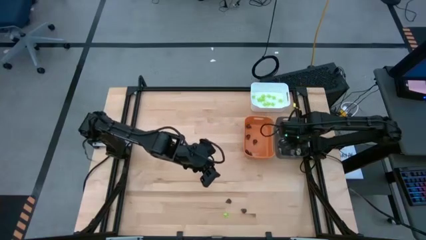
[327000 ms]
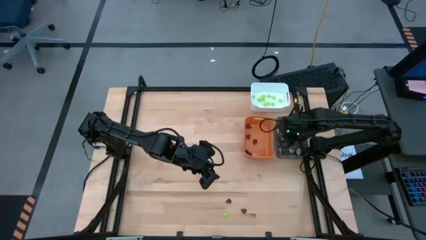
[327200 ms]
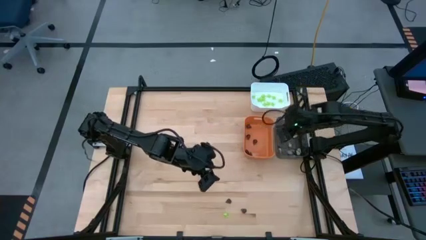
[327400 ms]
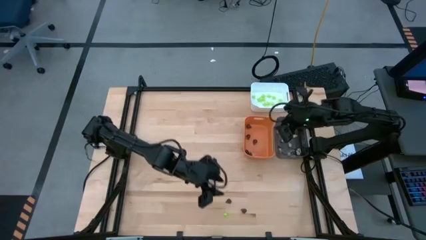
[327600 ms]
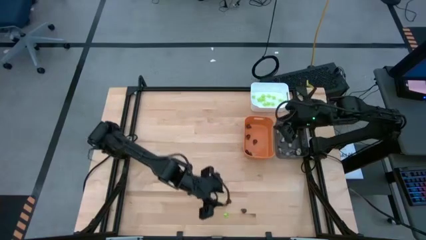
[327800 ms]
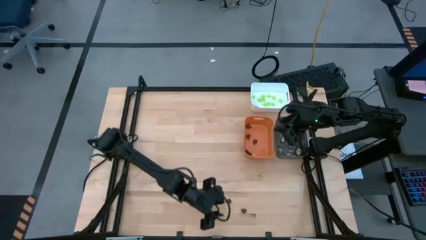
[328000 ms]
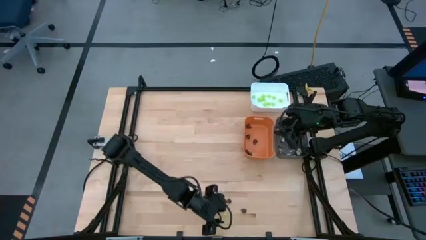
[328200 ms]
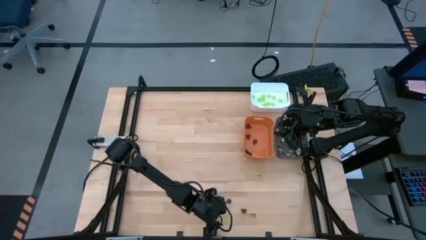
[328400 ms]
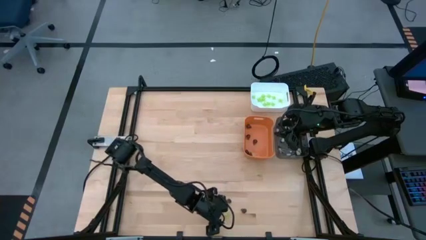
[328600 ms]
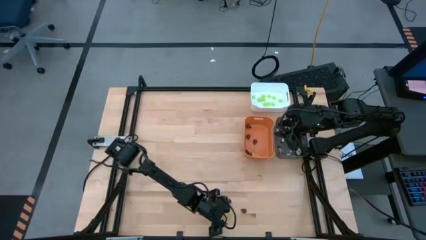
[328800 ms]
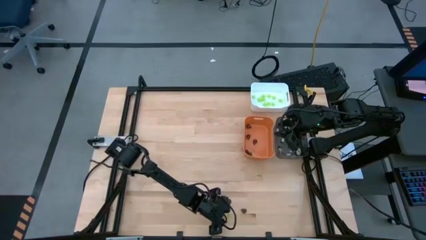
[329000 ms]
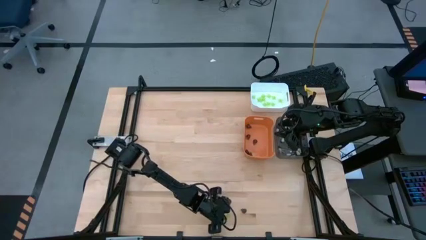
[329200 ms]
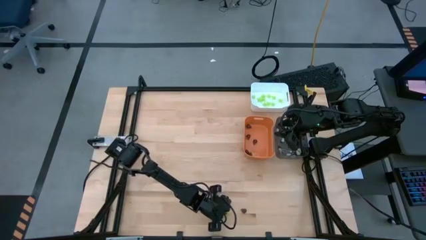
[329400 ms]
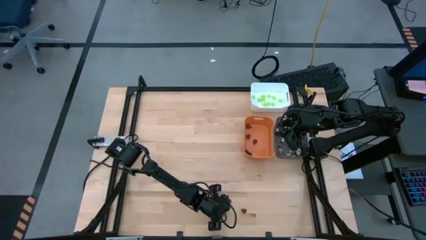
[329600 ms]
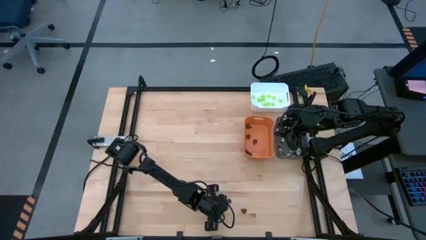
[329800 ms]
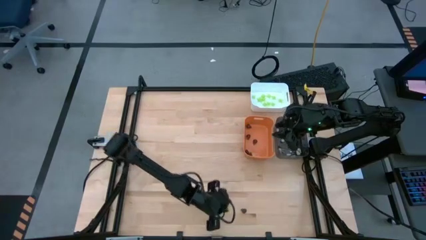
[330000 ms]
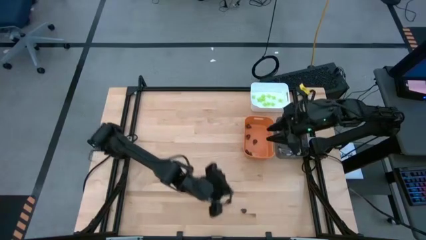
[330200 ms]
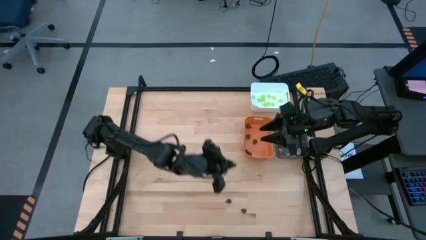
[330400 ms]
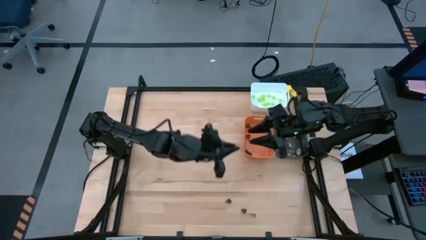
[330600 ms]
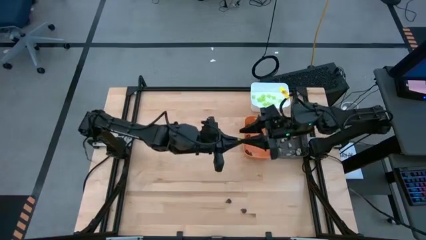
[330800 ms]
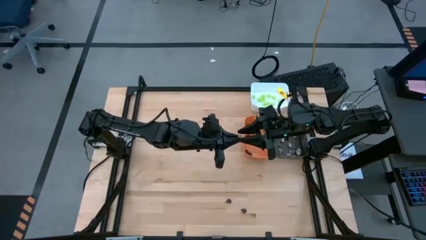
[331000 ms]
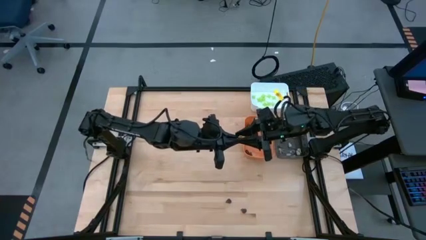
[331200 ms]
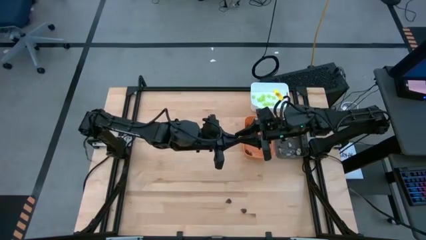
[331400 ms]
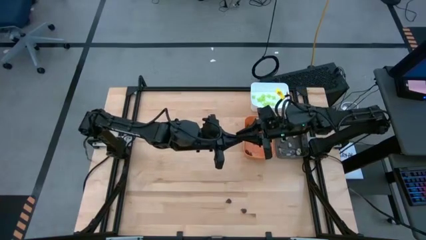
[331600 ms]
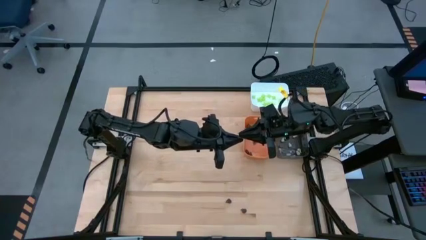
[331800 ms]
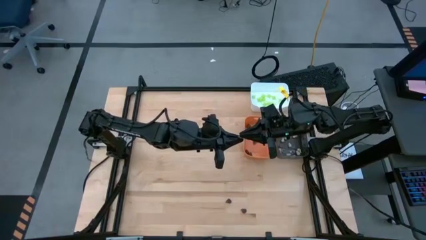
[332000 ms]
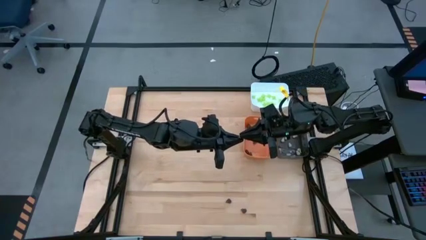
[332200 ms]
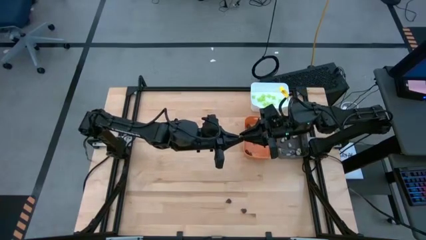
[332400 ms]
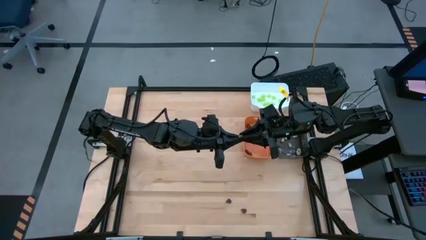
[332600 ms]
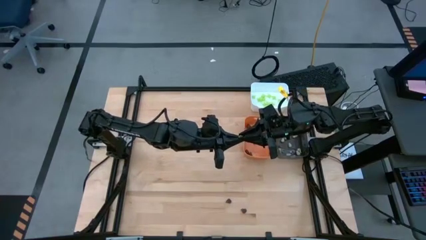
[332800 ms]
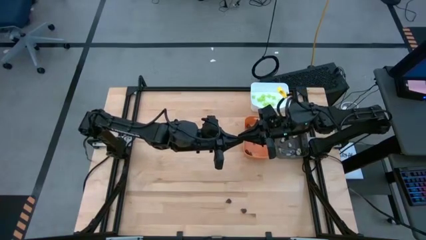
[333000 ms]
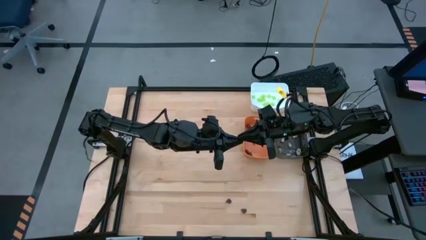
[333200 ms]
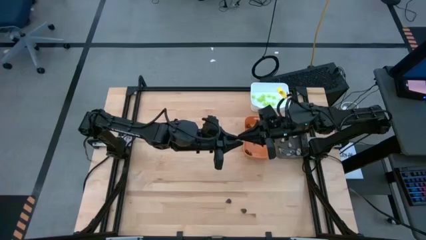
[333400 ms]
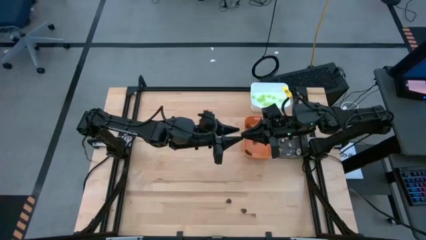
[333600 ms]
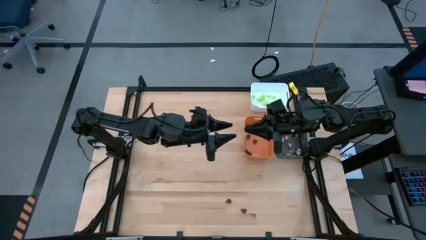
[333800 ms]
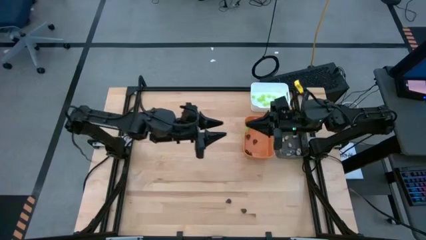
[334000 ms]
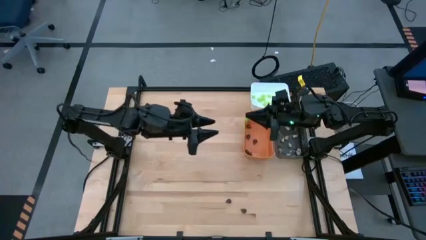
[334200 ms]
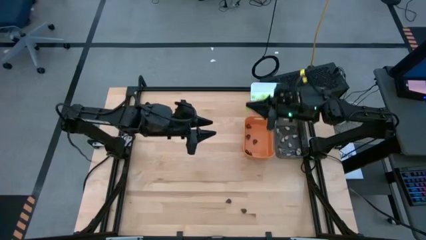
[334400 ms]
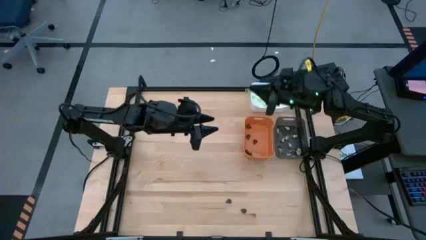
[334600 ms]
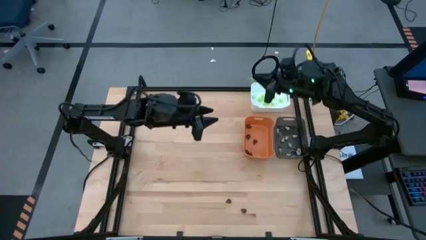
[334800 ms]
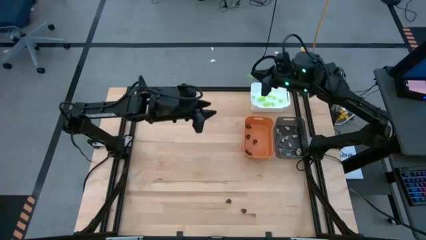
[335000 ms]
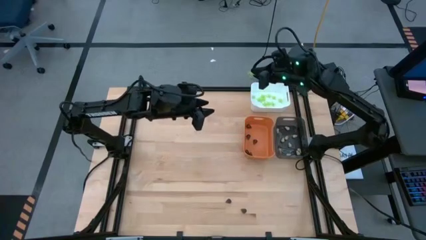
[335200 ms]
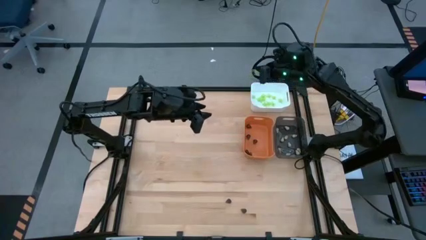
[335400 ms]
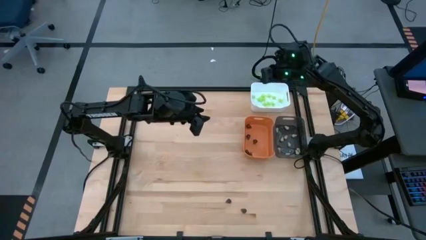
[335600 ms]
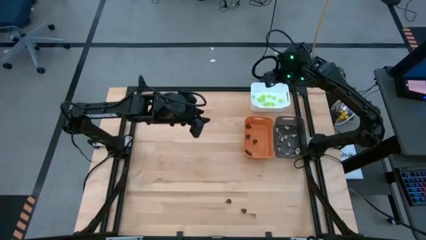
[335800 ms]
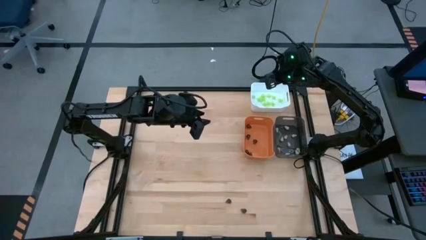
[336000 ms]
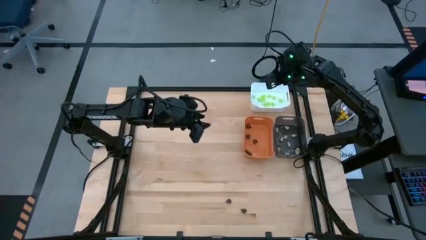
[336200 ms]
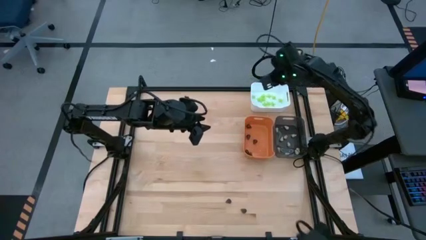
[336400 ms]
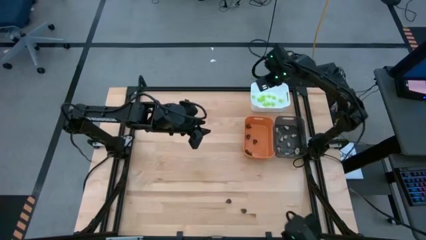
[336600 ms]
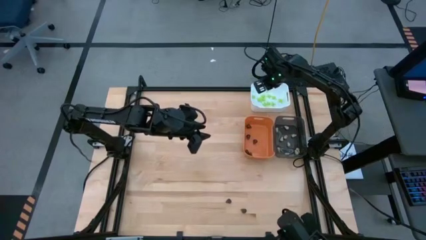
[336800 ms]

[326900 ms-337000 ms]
Task: Sort Halloween decoration
Put the green spider toy into the white bin

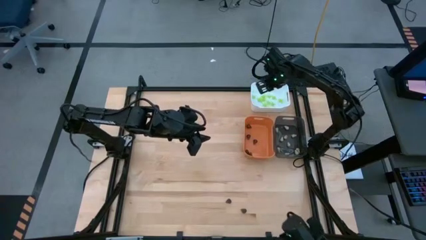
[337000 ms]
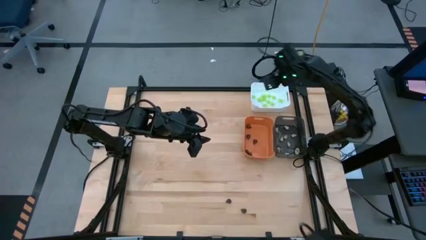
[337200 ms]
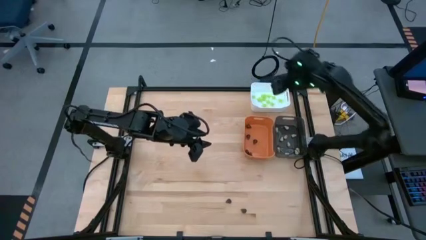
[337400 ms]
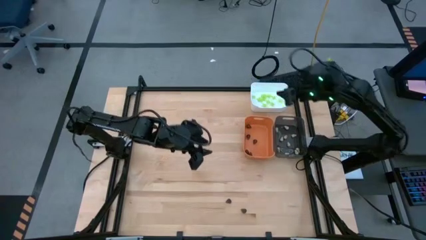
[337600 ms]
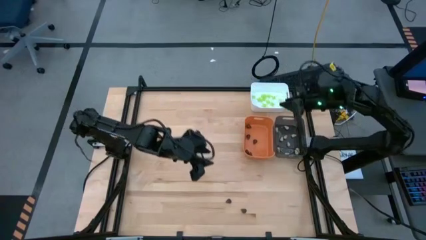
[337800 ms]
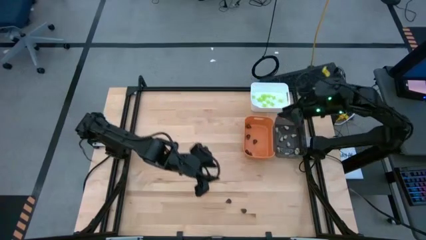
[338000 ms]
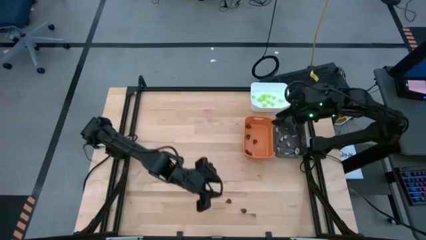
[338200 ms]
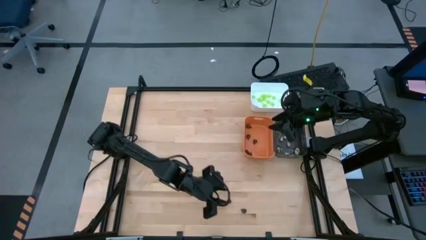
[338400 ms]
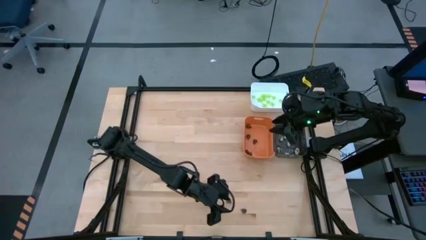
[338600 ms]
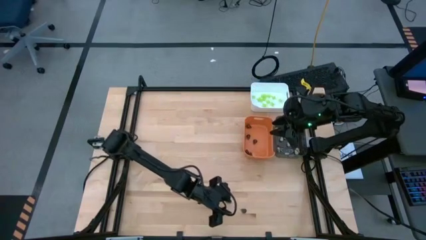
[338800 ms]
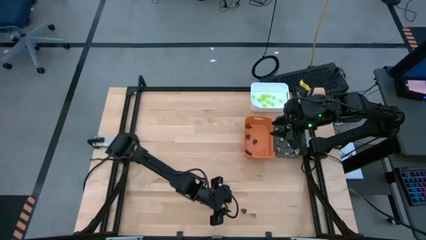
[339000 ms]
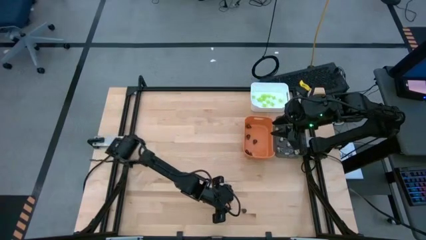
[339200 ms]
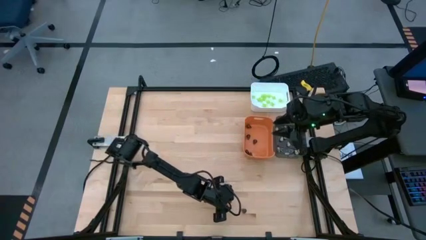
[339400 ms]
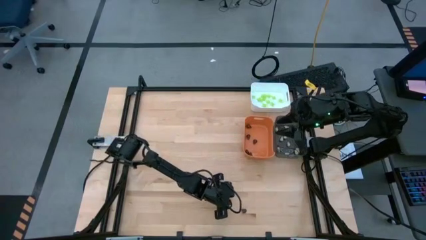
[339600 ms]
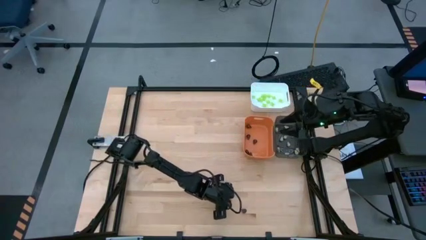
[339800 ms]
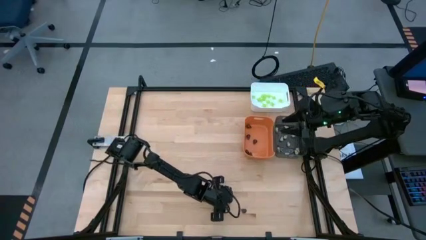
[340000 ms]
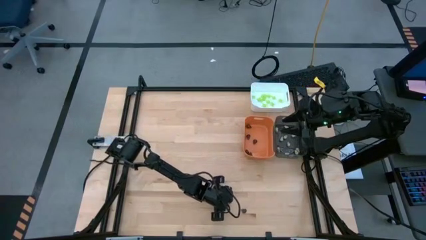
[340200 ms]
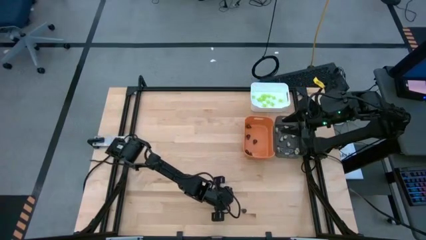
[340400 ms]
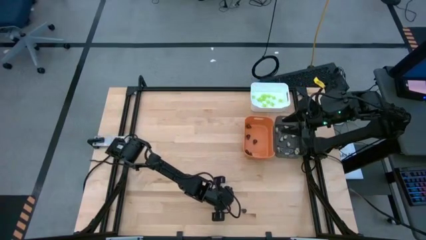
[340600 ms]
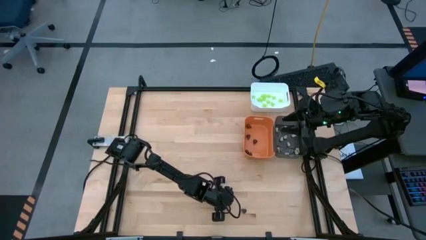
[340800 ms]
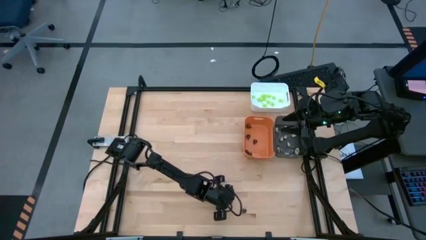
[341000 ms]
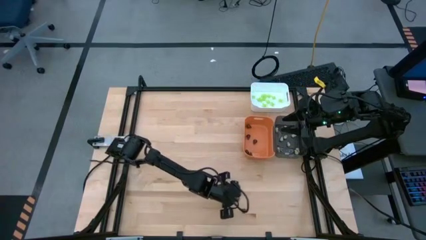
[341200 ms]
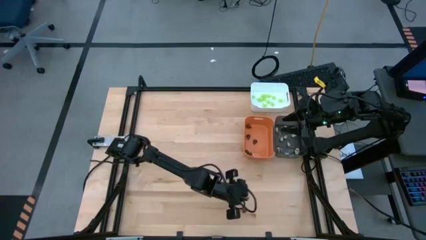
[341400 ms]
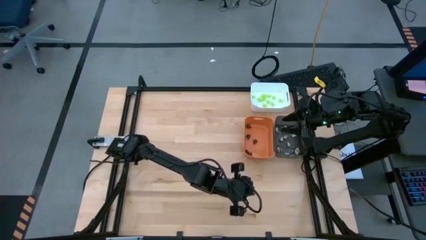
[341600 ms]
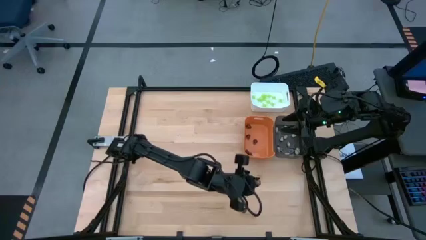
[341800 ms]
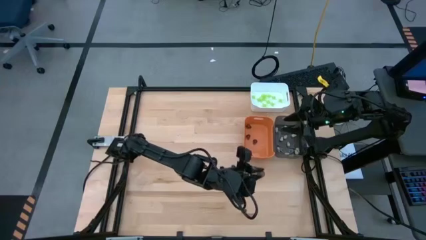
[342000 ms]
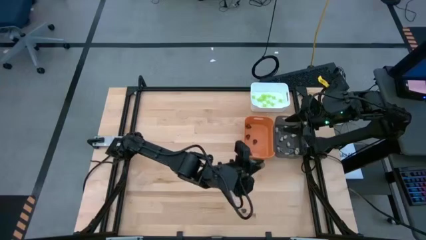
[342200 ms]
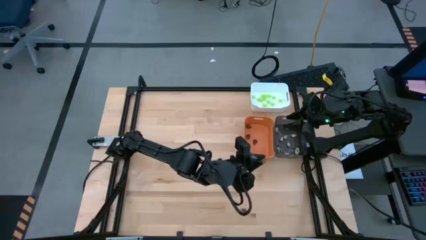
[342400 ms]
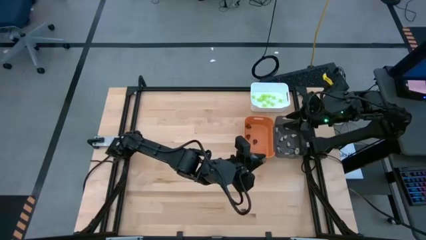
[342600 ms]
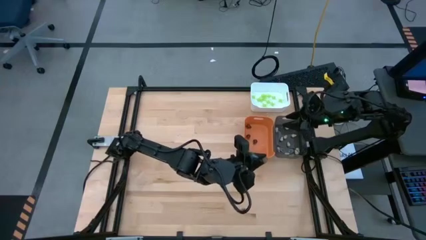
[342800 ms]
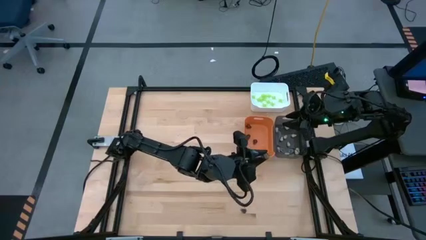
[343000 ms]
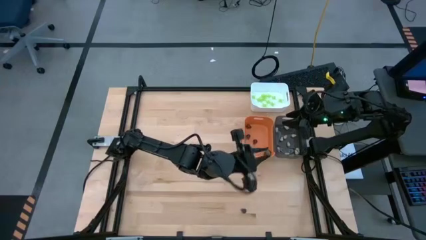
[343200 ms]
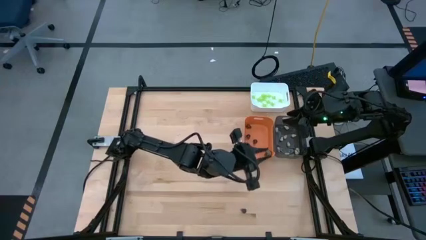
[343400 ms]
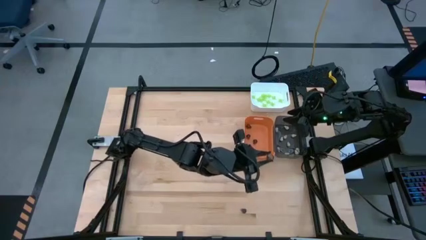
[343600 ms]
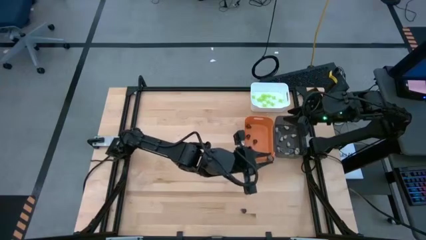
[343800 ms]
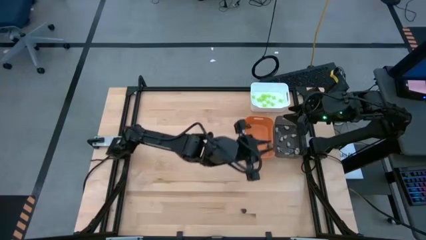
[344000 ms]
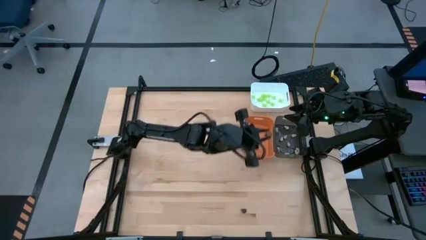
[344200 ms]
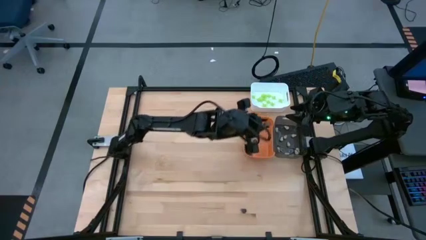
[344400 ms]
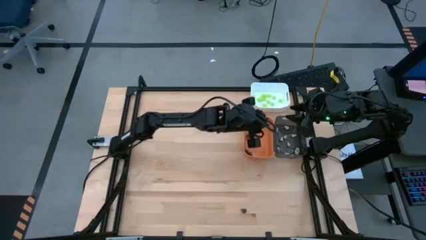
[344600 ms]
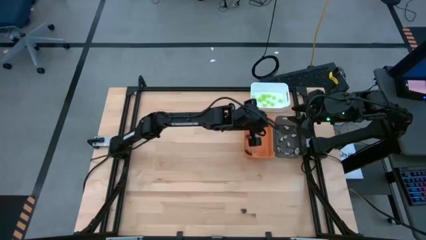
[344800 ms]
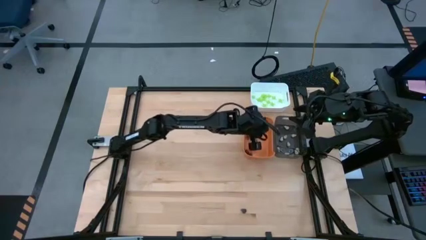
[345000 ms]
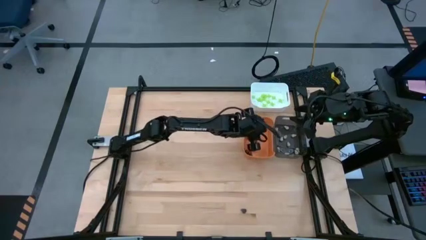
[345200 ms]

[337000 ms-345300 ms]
Put the black skull toy into the orange bin
